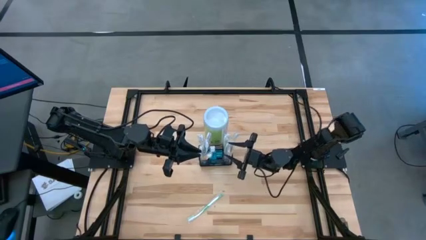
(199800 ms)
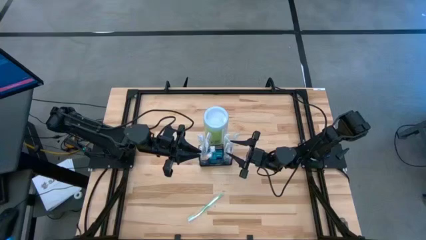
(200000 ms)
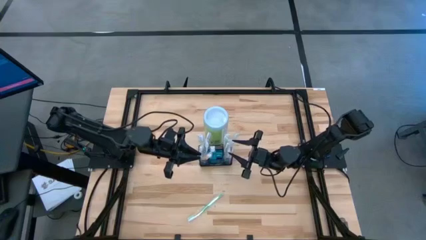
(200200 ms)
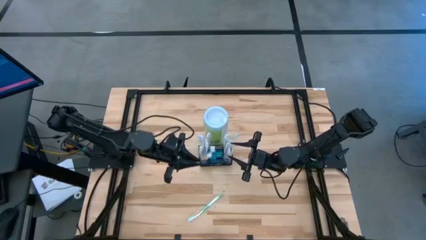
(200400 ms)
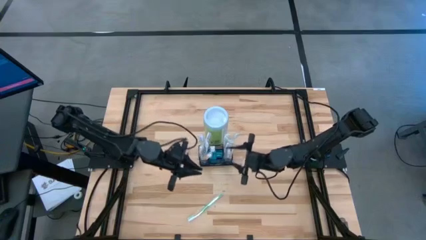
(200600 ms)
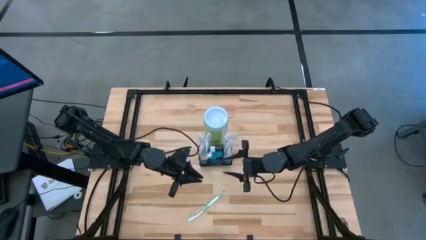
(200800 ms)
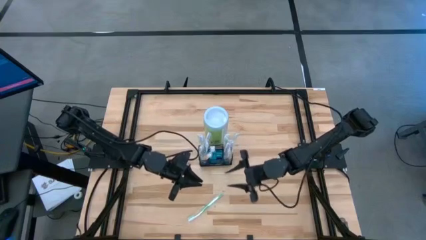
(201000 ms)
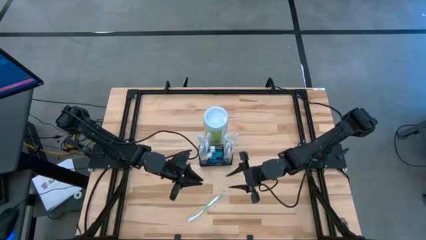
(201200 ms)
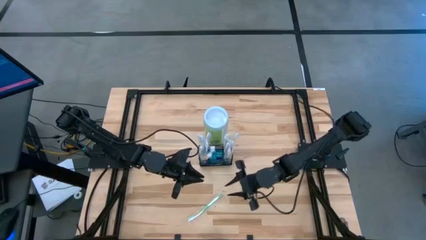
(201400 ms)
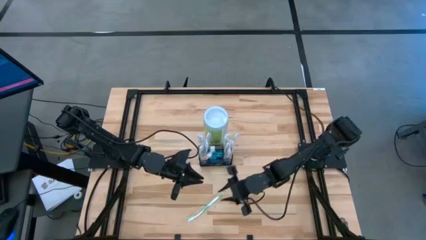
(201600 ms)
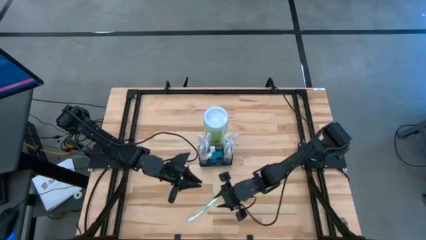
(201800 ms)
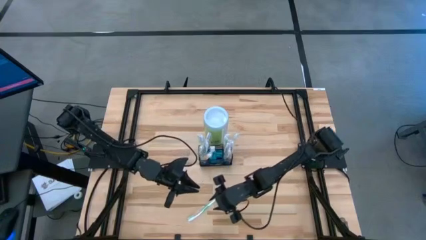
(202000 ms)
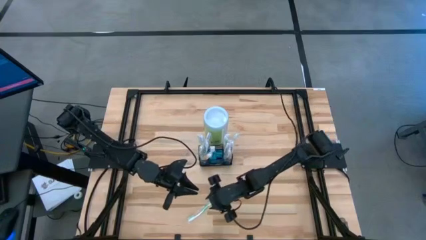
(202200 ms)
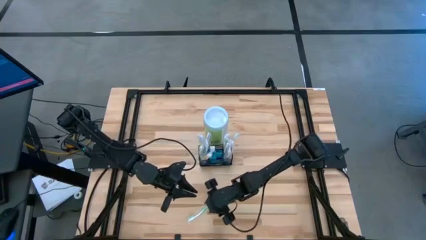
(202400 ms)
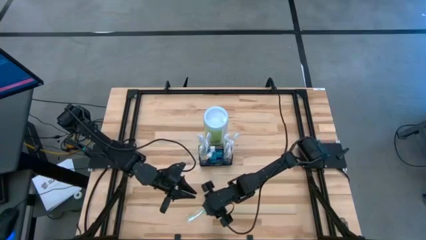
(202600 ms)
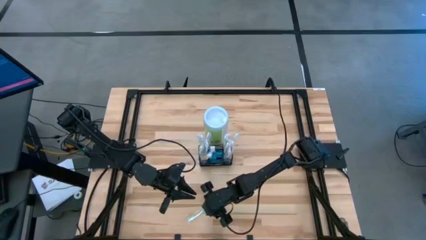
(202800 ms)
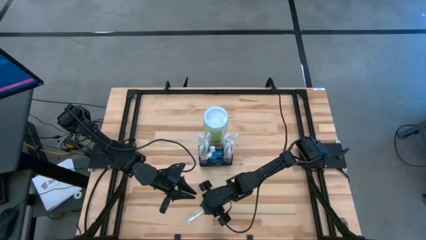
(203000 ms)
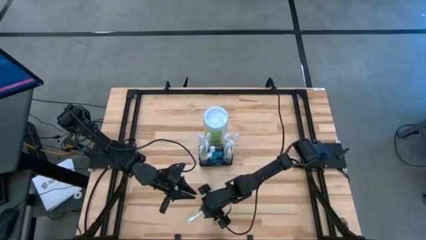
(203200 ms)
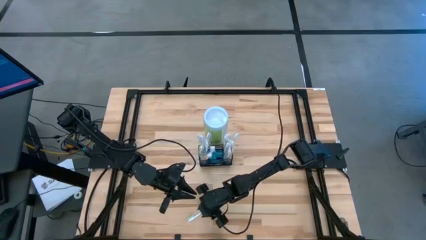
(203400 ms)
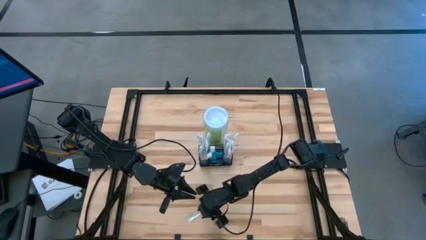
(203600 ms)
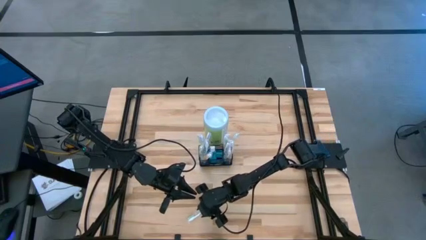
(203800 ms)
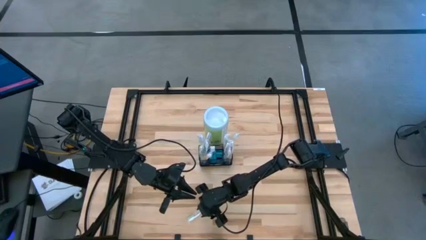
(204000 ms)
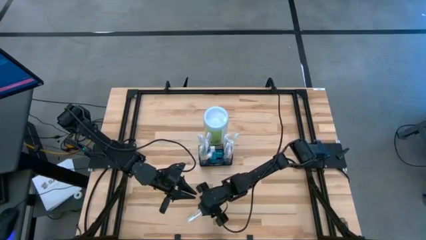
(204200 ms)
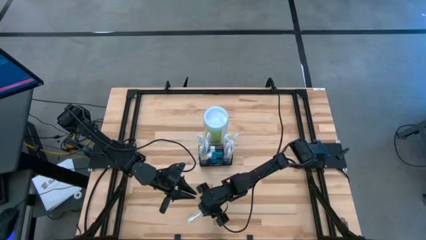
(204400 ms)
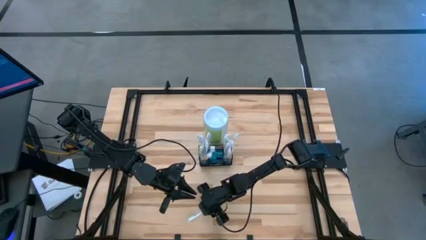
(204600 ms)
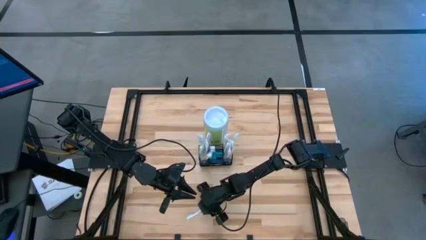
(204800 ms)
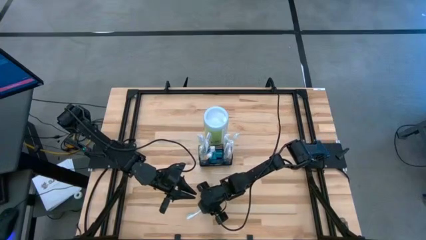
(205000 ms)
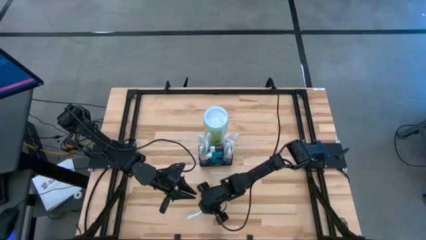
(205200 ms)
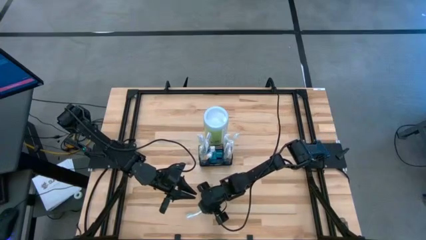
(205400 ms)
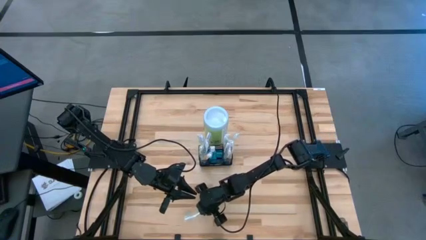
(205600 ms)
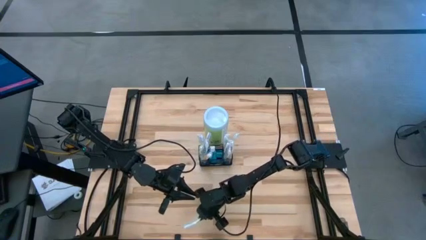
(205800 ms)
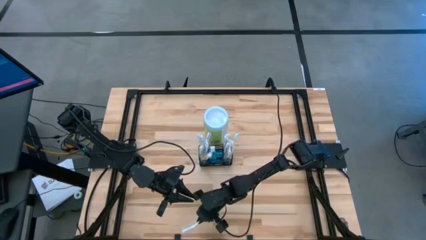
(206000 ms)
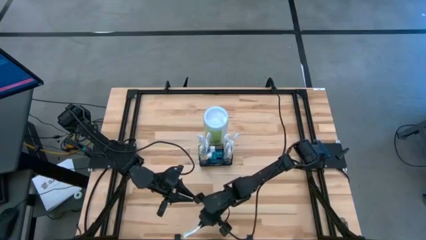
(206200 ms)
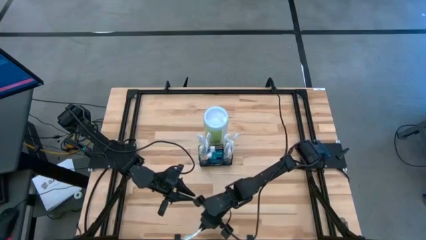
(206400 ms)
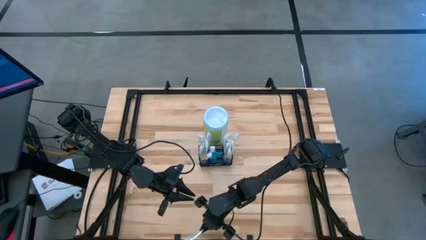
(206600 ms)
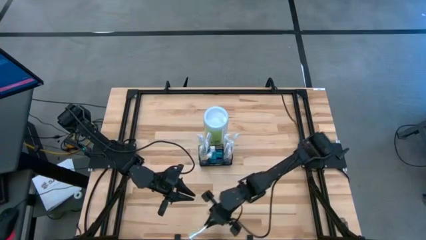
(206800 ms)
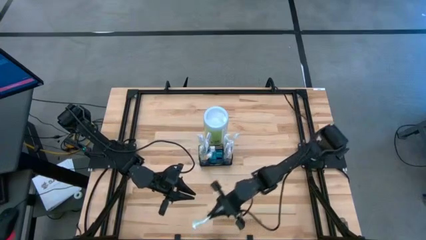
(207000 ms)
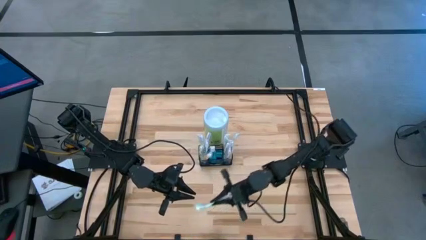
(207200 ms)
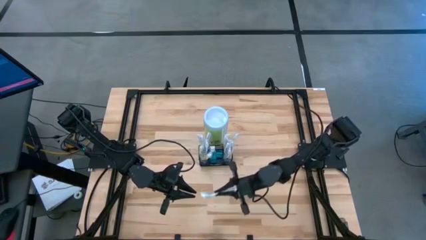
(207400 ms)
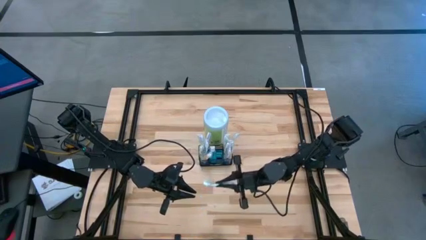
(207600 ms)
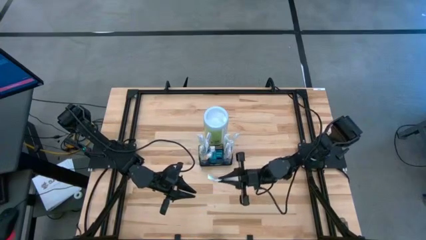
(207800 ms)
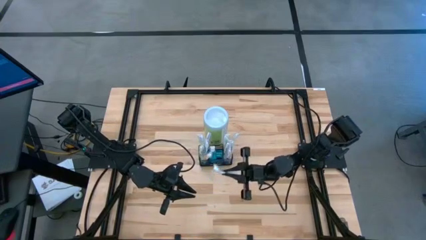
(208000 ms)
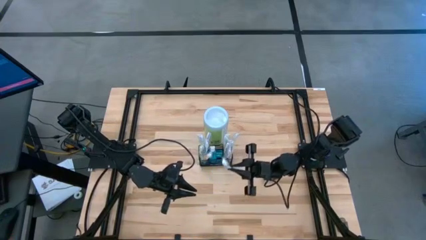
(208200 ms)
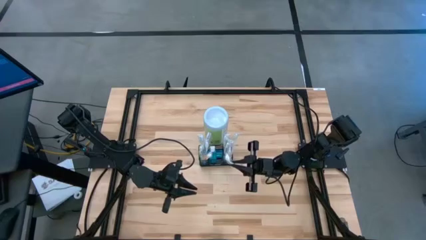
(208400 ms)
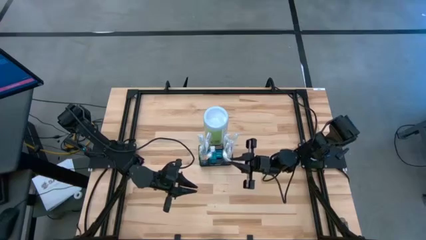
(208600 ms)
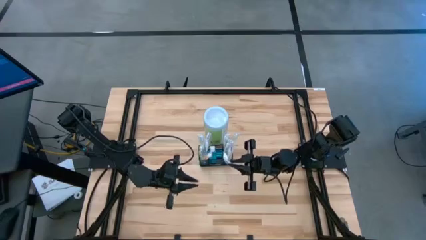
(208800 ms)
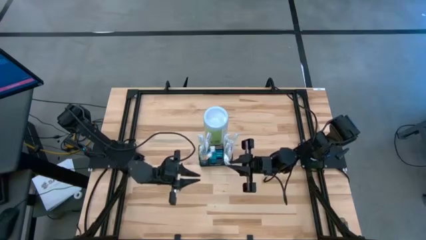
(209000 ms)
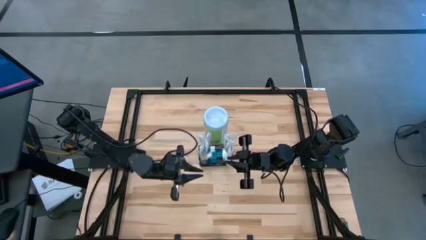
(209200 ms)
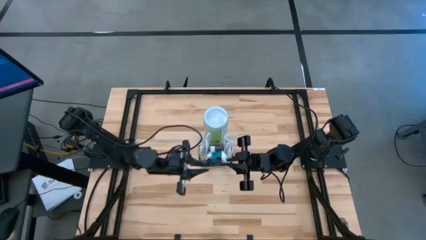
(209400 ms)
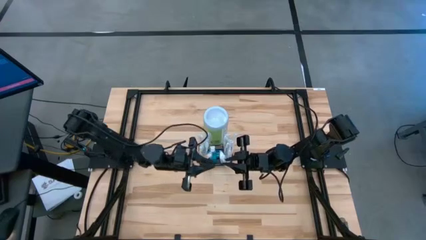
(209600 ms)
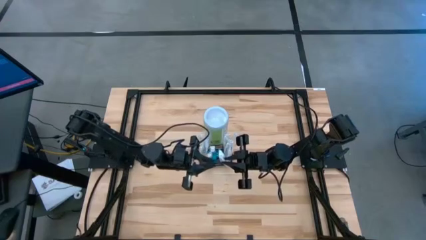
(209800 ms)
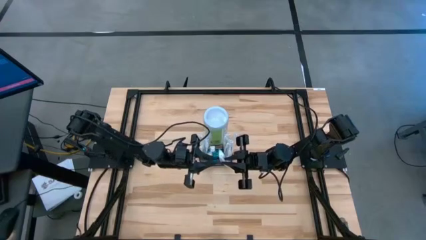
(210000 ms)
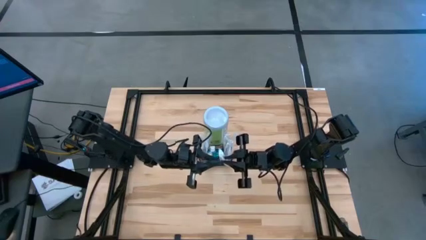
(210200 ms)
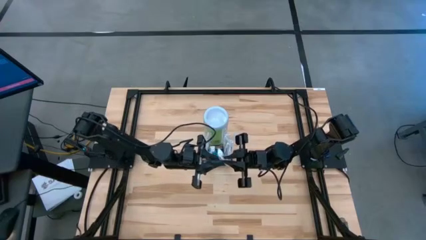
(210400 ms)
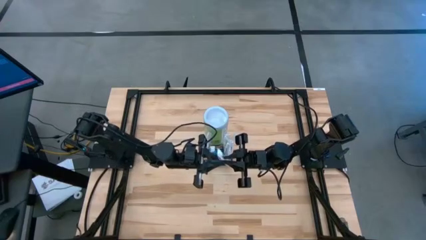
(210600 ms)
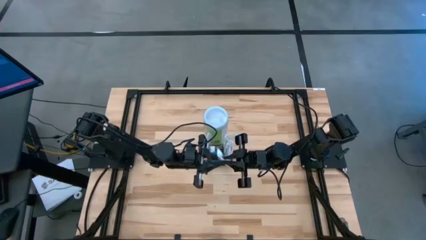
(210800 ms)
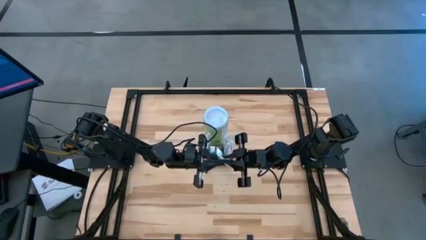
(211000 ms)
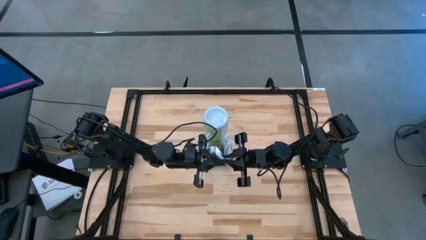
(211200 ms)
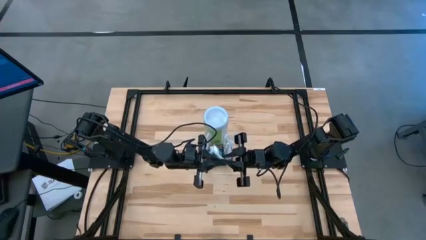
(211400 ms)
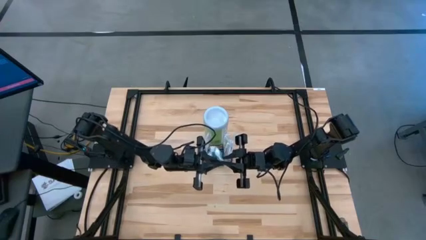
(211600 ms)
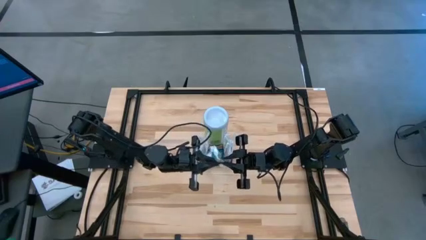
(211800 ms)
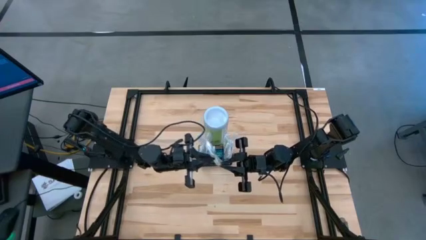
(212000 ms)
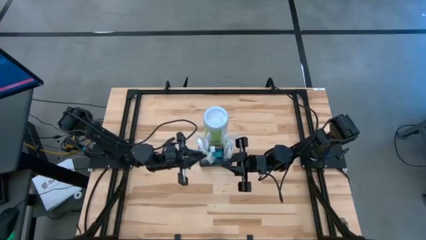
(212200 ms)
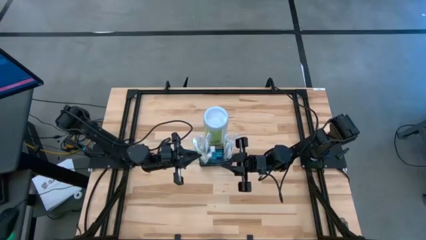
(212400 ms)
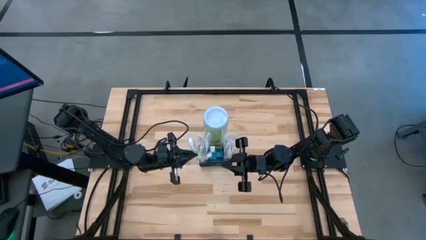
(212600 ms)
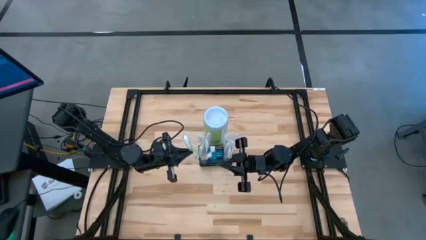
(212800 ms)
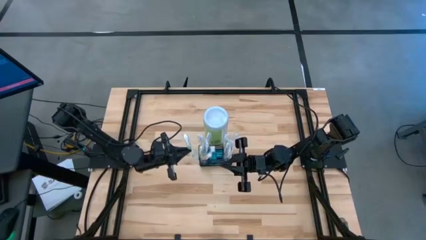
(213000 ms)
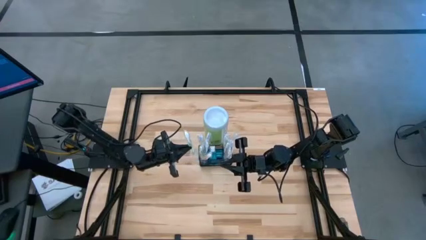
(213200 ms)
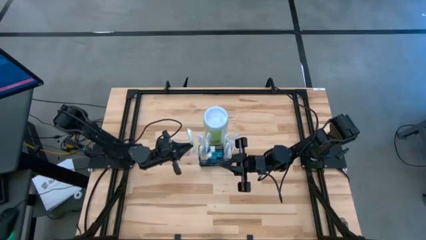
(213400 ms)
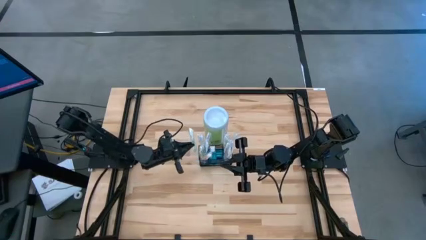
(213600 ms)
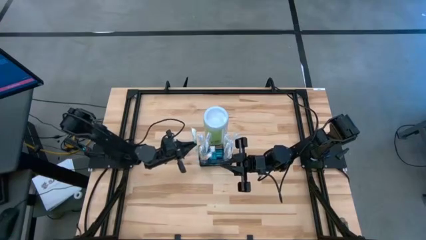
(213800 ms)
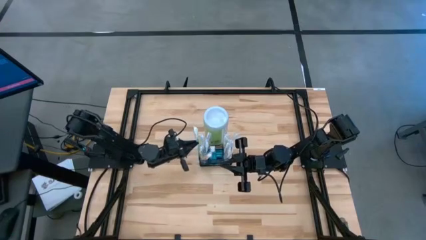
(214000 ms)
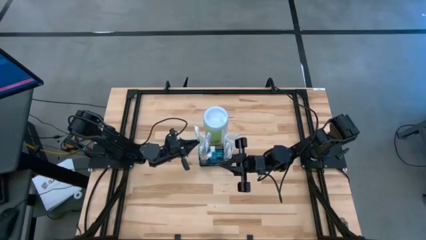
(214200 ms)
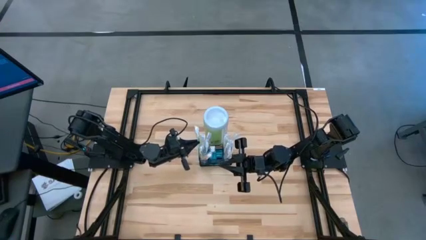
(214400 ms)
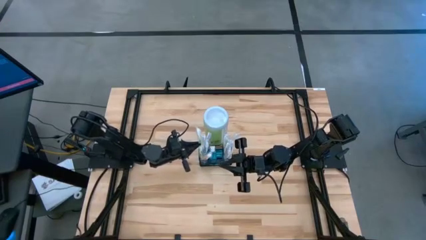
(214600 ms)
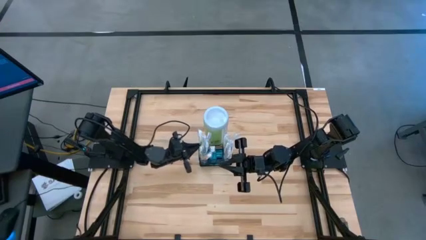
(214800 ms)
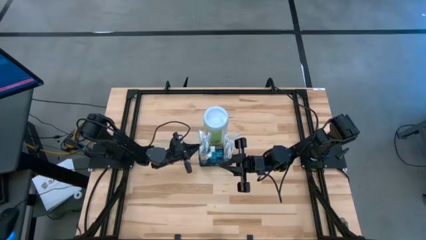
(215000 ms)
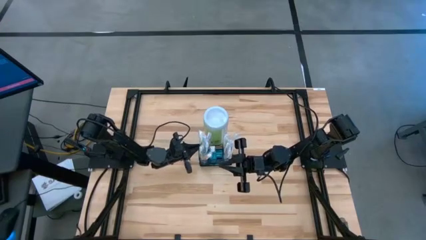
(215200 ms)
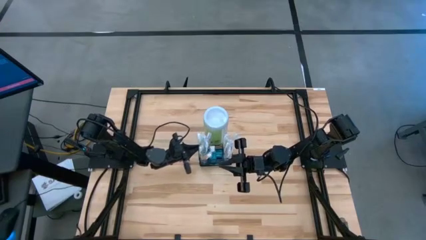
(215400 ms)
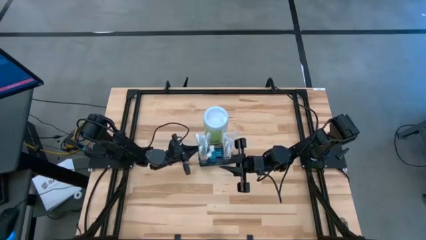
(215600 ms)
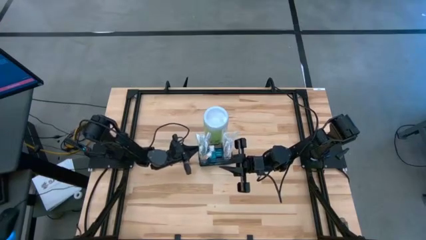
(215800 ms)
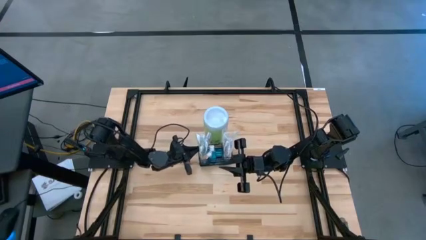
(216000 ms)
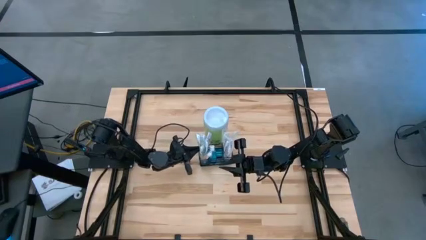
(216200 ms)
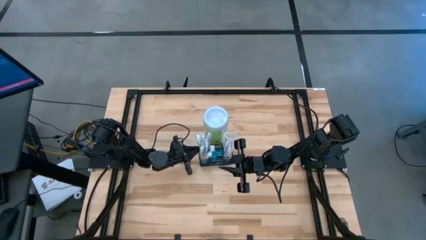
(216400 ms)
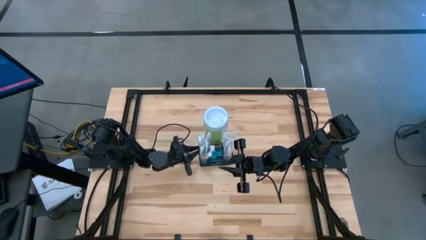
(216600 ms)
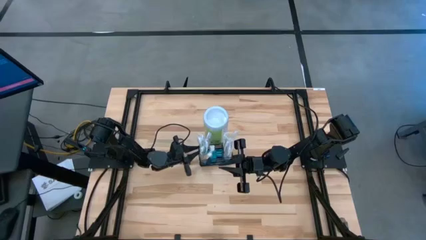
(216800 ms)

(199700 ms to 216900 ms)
Task: Pick & Place toothbrushing station
Put the green toothbrush into the wire organizer
